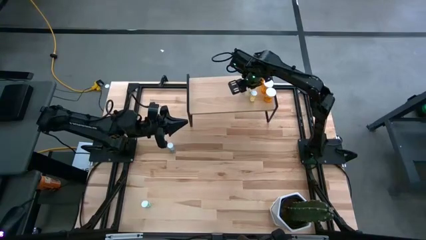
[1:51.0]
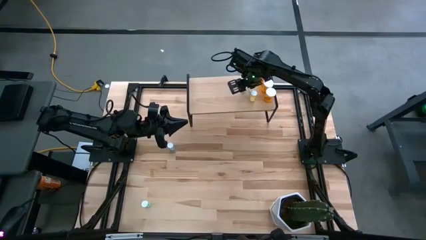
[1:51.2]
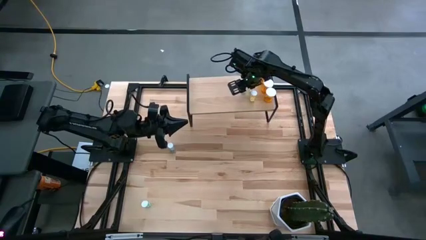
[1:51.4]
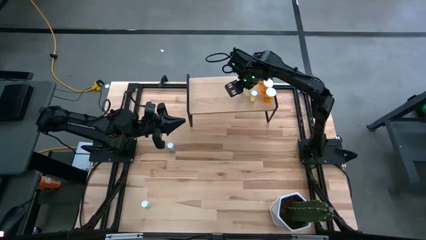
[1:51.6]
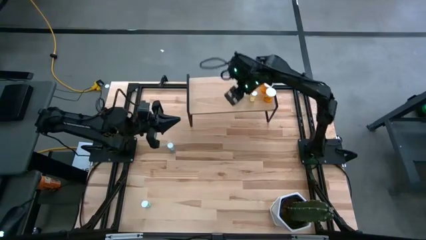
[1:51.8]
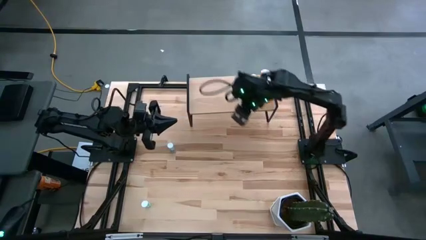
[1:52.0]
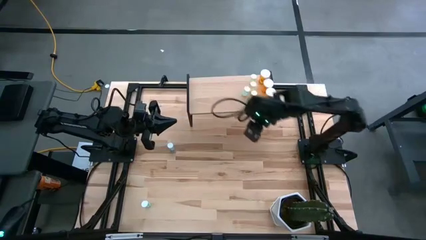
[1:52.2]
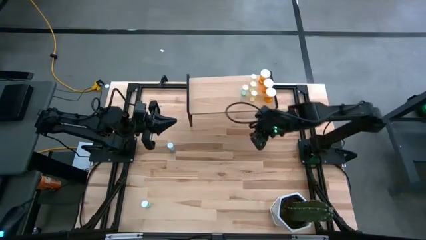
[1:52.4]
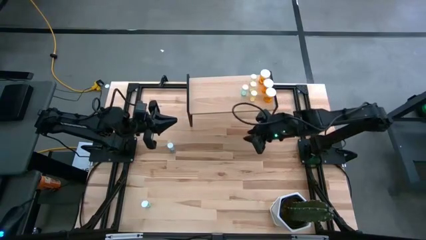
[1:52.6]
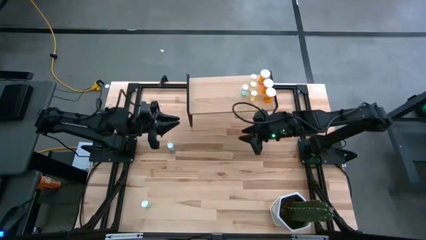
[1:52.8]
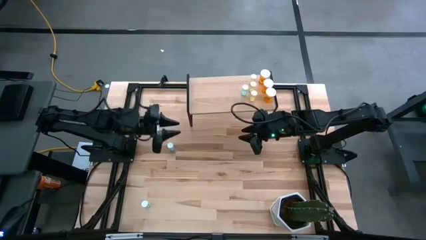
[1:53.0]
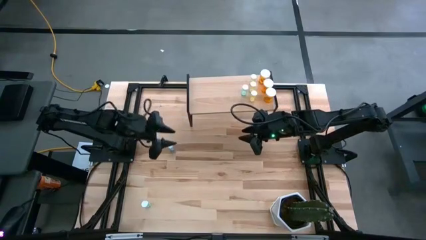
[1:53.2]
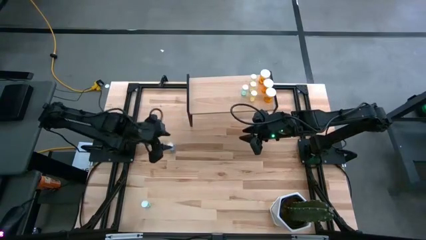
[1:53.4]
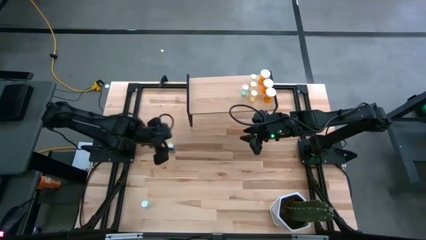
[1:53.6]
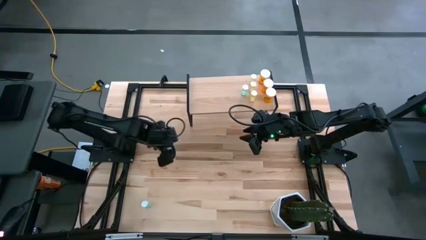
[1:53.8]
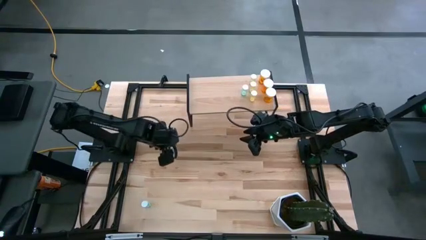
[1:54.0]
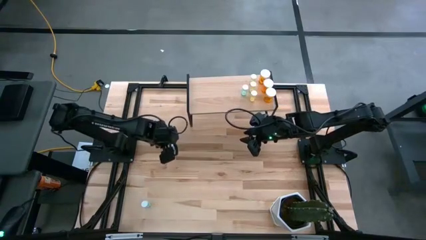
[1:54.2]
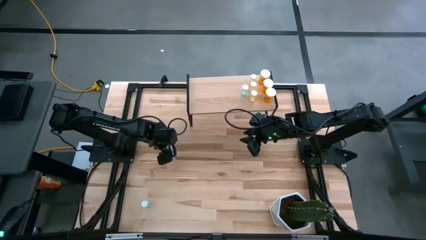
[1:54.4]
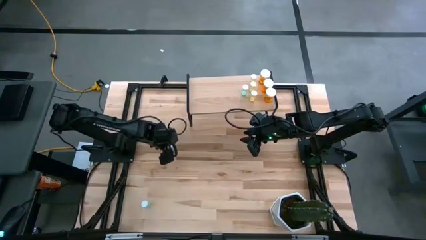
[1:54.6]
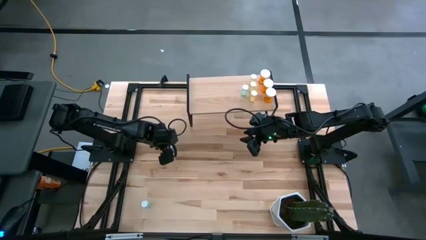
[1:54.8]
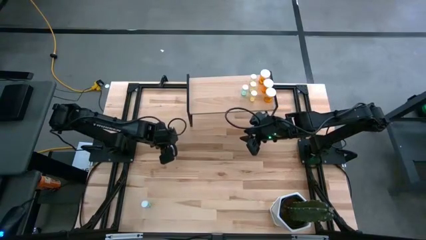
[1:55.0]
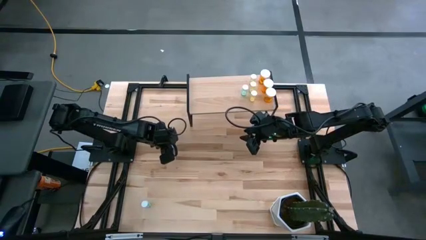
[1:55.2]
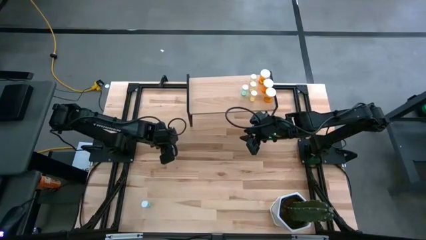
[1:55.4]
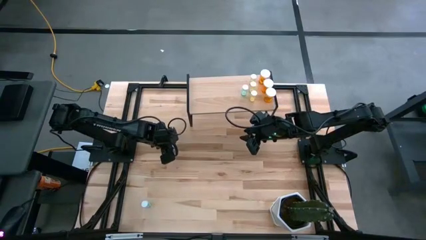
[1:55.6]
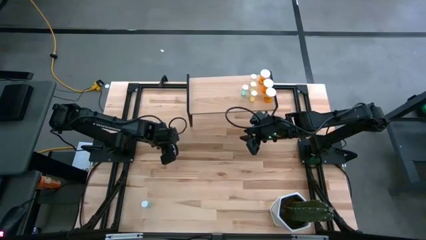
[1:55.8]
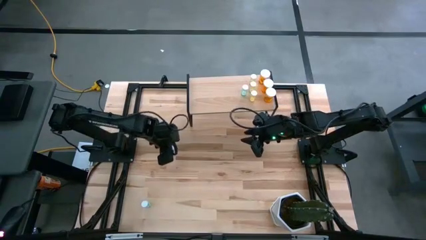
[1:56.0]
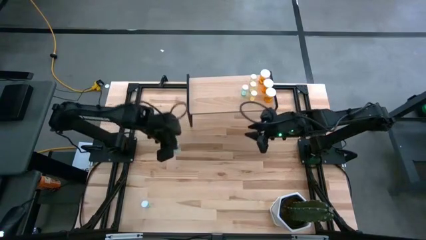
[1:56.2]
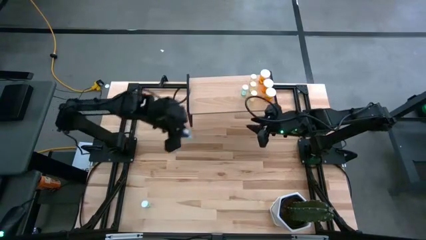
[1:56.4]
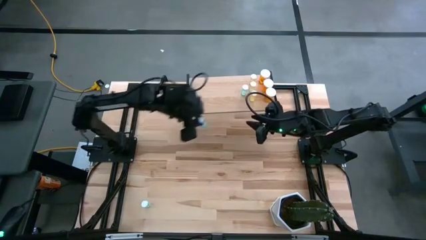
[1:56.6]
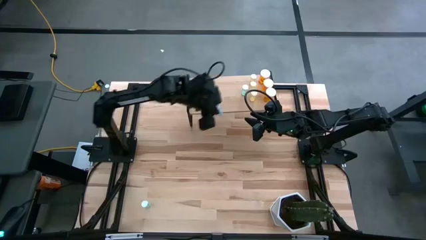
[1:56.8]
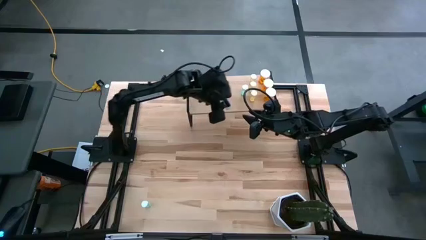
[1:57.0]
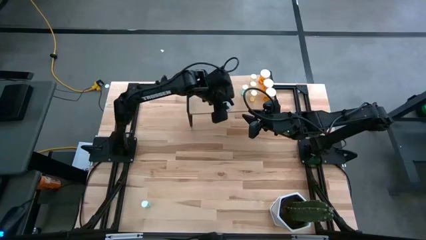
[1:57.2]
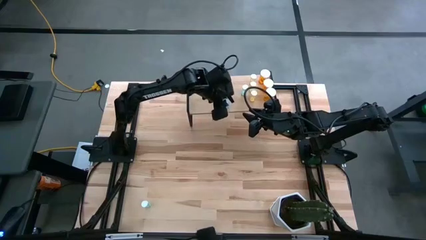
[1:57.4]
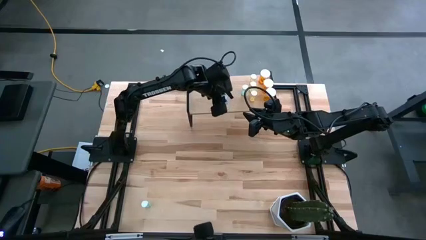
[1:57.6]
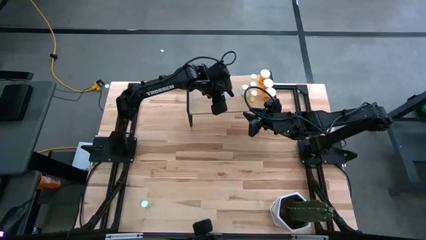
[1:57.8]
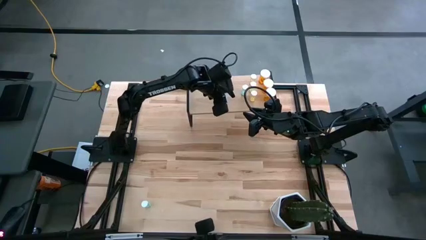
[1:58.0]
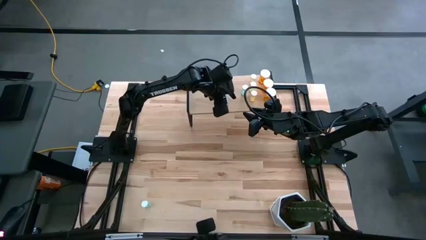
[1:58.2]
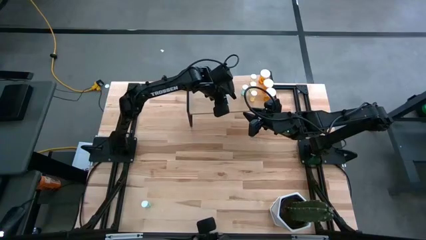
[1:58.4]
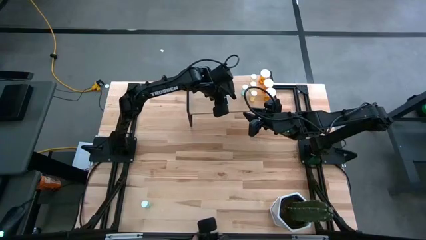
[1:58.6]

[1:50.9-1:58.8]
Task: Pick and place medicine bottles onto shelf by color
Put the blue pill bottle on the shelf

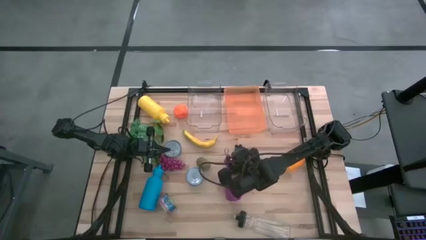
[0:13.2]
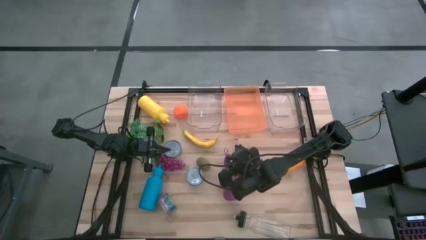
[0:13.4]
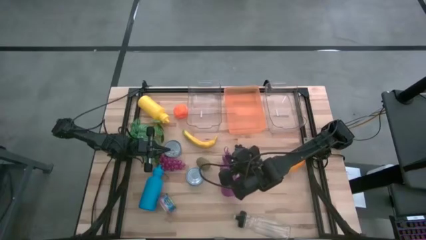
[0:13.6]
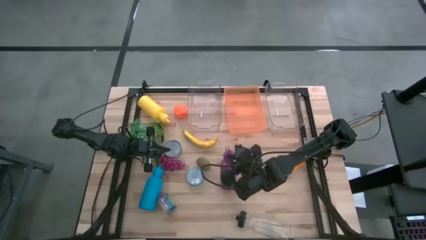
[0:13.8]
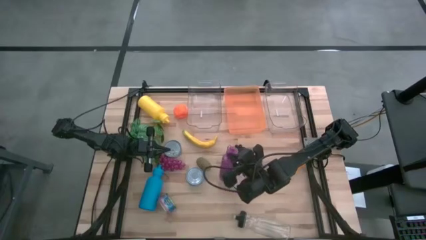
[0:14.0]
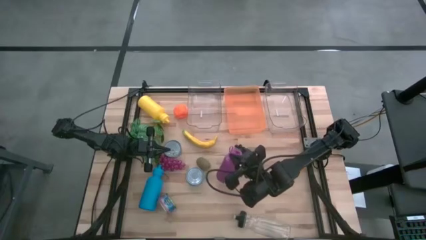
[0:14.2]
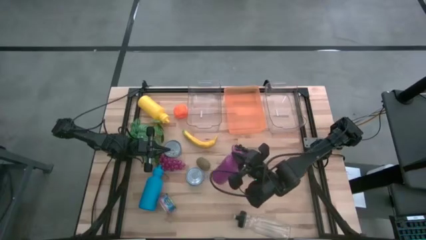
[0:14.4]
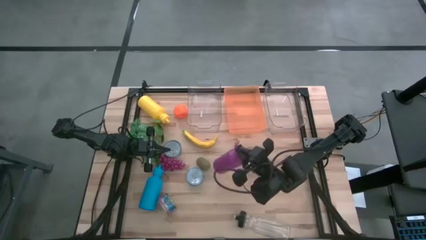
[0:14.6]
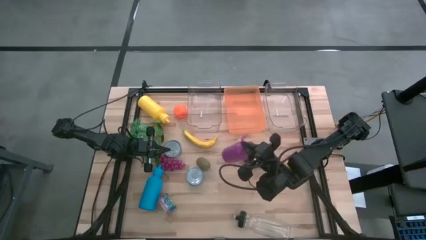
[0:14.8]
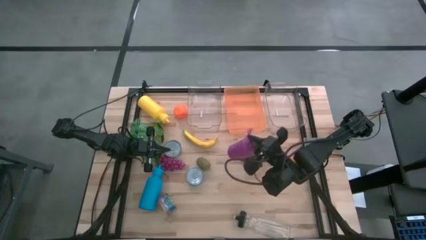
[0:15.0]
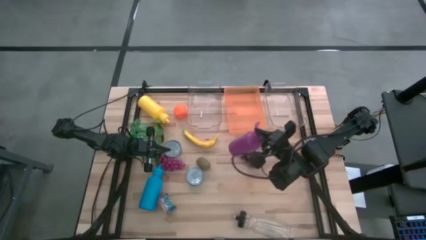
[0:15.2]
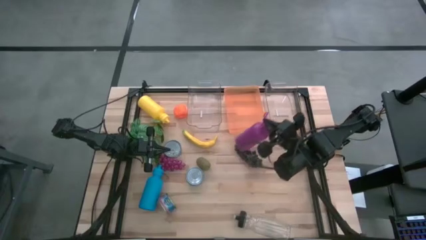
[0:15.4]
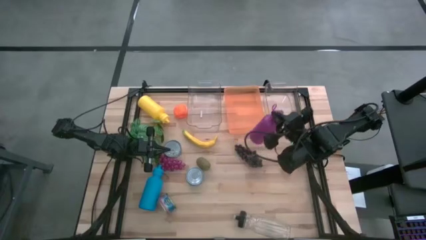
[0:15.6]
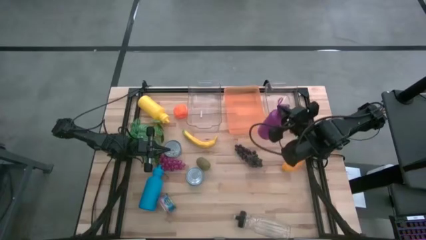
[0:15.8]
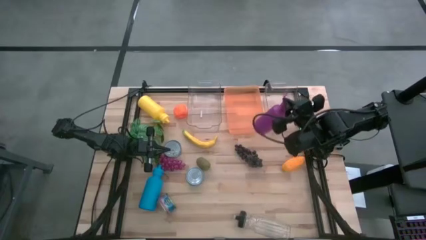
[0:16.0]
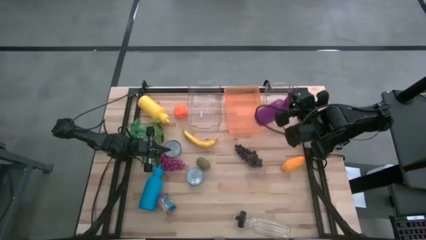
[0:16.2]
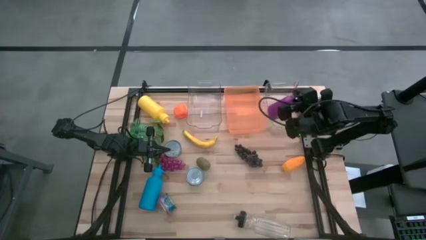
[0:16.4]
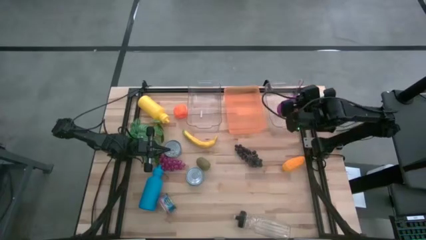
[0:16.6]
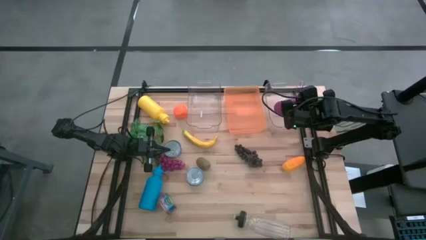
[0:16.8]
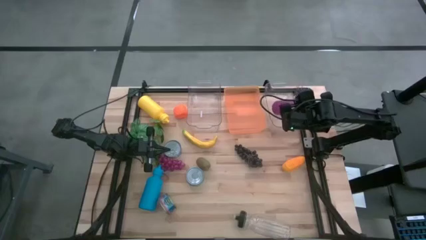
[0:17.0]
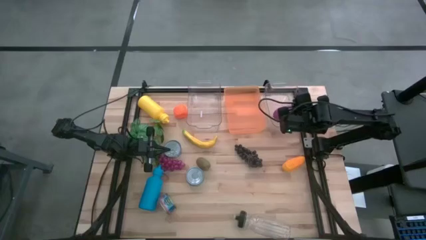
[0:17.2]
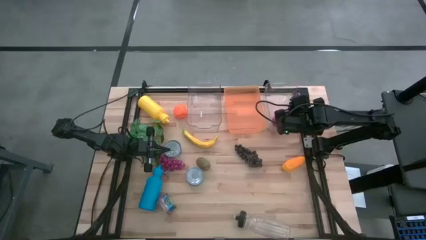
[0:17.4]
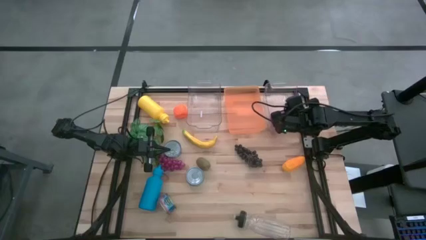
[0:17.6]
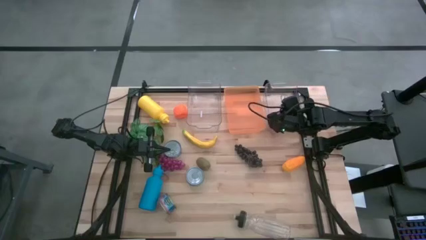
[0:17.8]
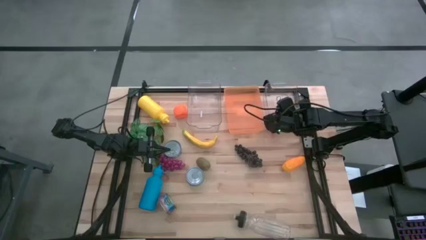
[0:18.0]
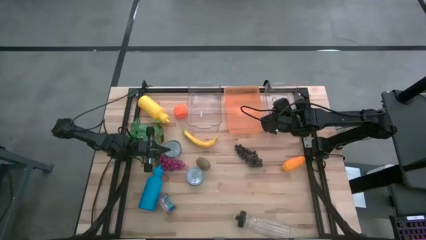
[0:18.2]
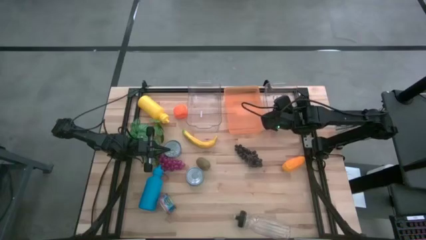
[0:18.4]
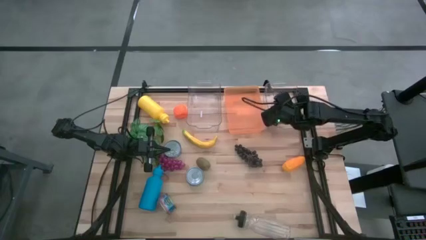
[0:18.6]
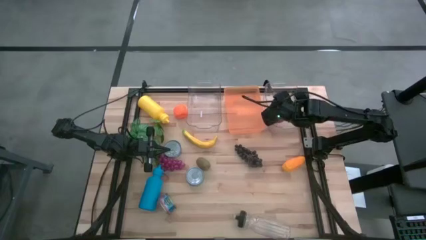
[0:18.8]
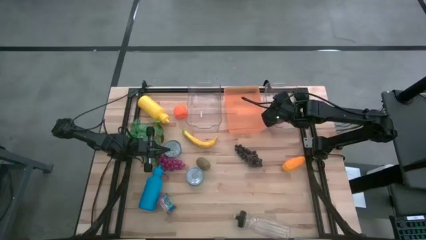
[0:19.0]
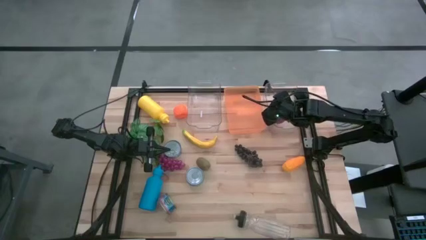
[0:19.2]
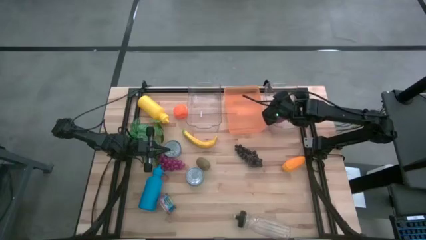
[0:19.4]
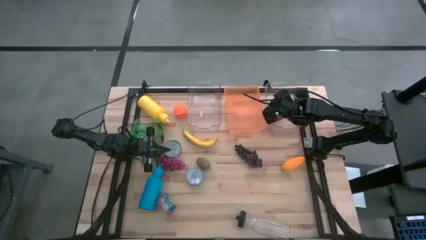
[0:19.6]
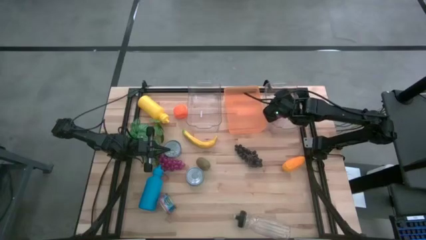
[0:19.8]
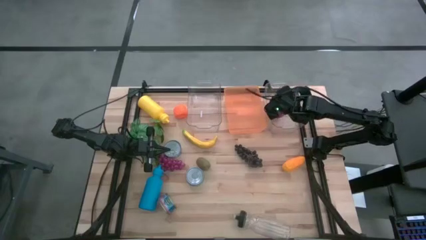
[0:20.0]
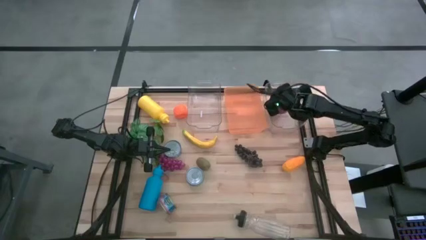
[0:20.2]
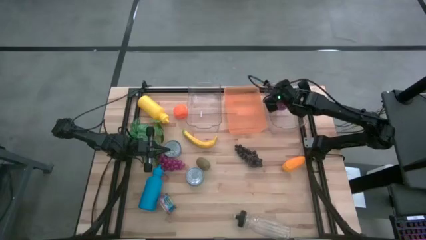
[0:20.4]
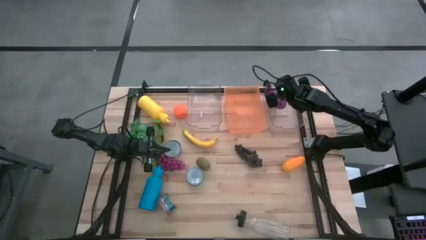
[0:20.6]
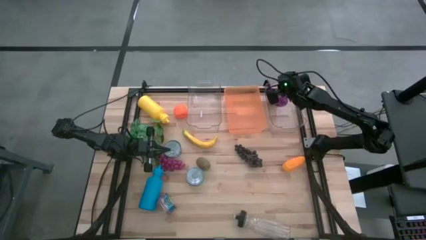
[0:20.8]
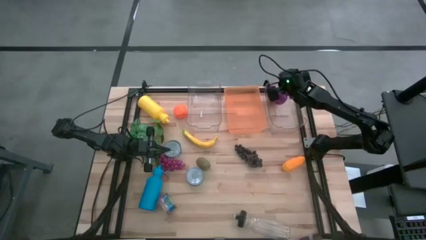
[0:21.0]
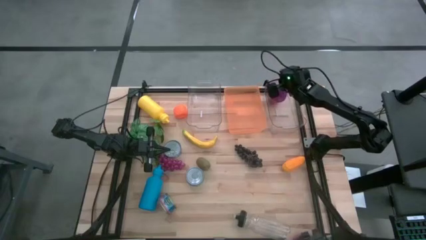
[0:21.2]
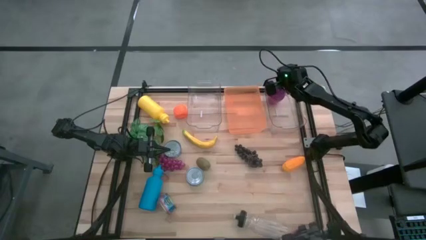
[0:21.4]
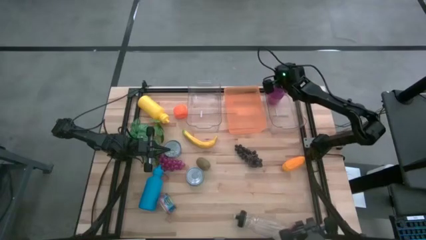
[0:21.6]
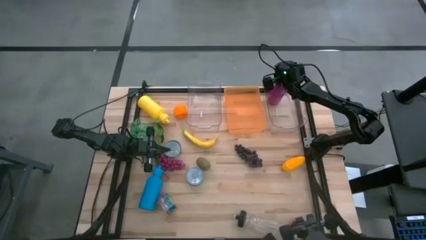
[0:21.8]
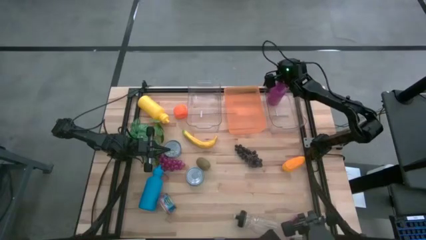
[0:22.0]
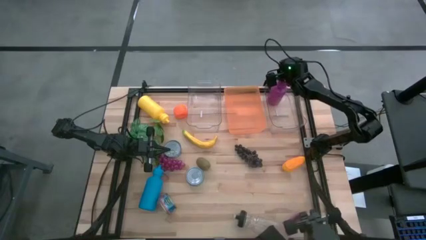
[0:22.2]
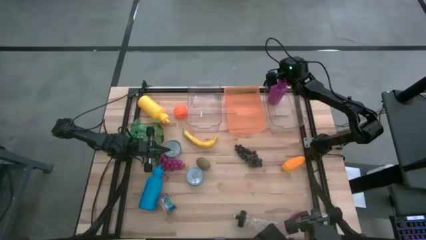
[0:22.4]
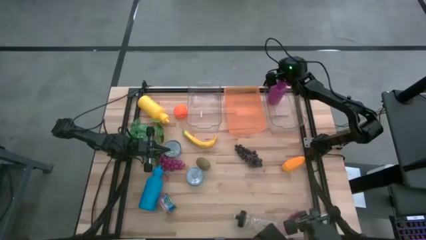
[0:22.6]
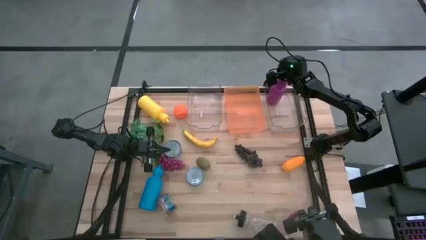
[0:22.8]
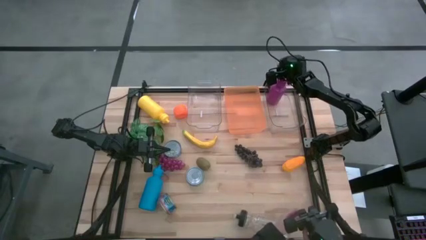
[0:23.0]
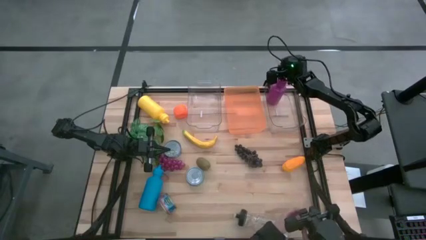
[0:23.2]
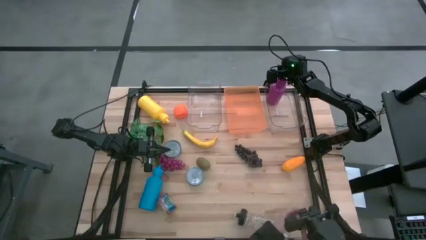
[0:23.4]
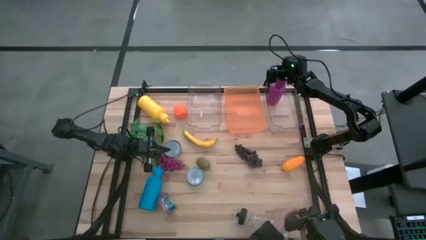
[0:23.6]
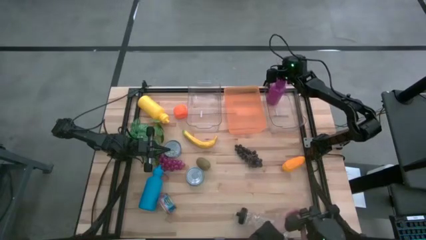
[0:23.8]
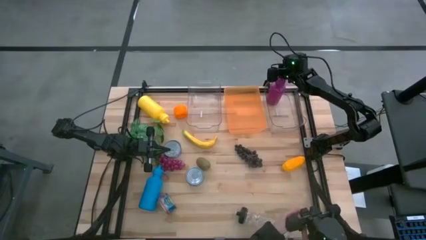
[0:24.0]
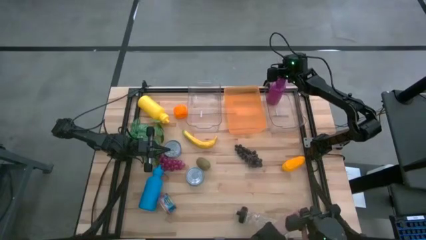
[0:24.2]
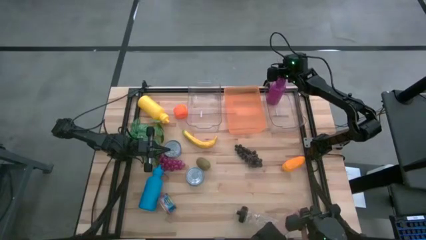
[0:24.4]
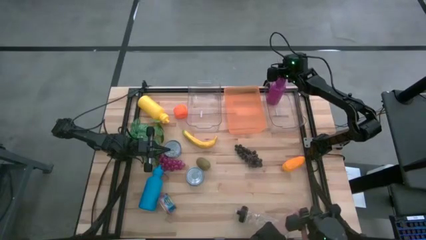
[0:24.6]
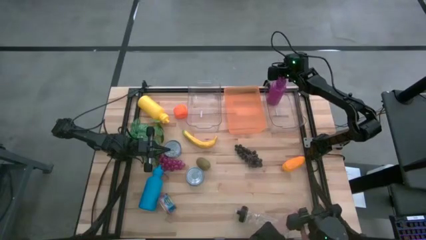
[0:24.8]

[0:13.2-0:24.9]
Task: Pick & Place Food Item
Put the purple water bottle into the right transparent bin
